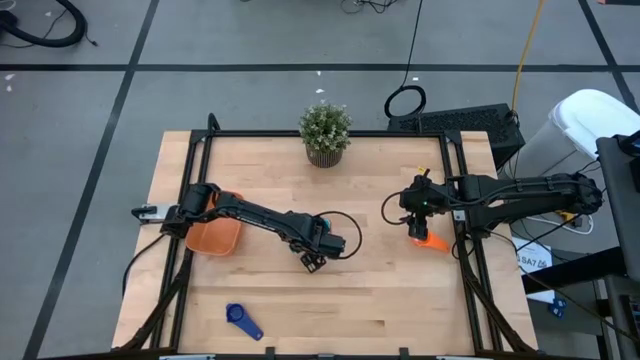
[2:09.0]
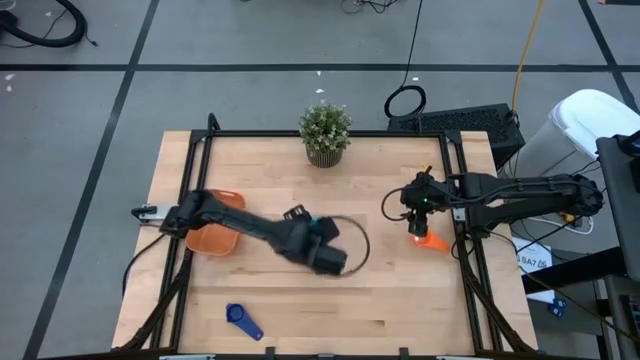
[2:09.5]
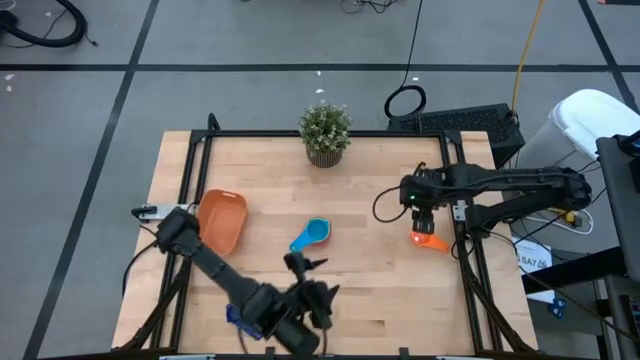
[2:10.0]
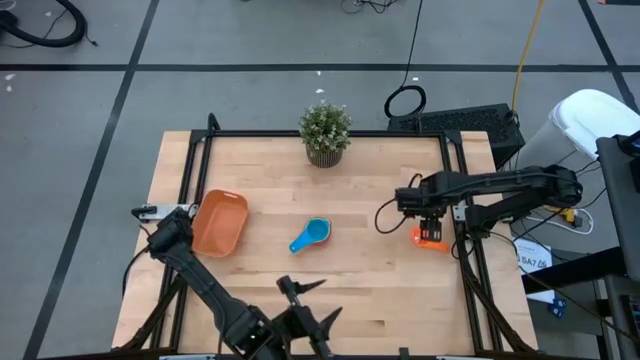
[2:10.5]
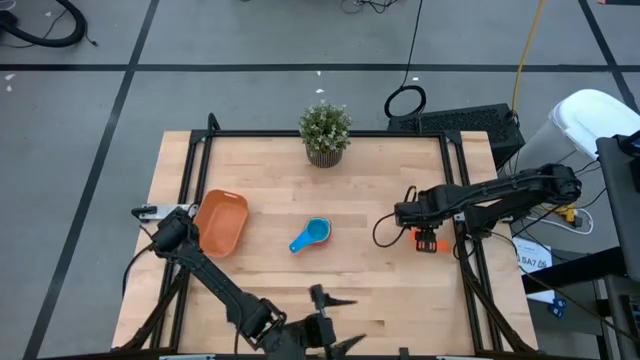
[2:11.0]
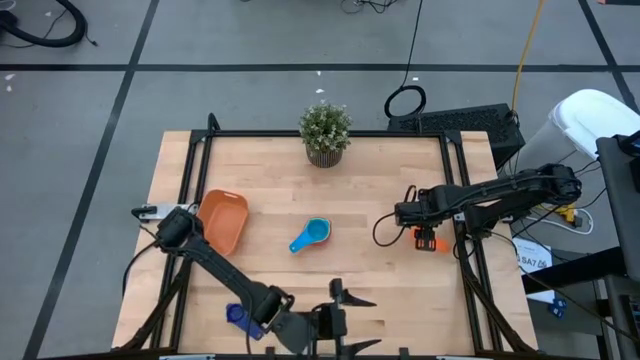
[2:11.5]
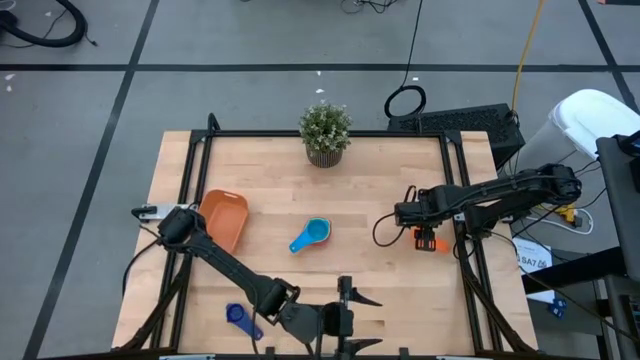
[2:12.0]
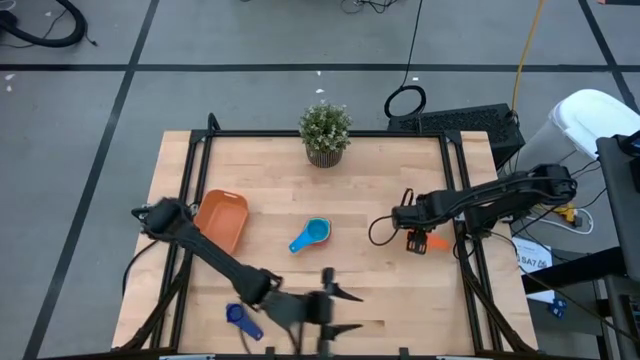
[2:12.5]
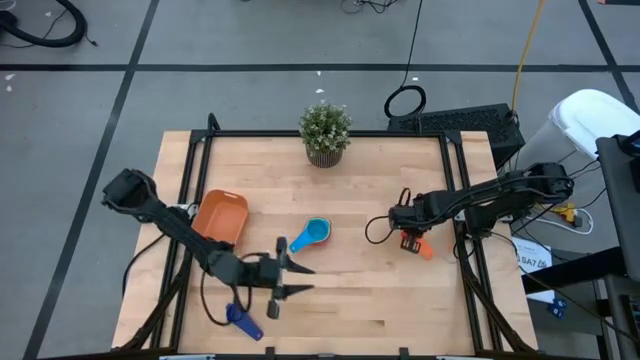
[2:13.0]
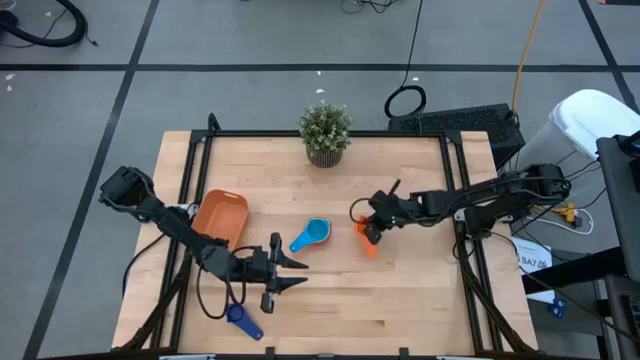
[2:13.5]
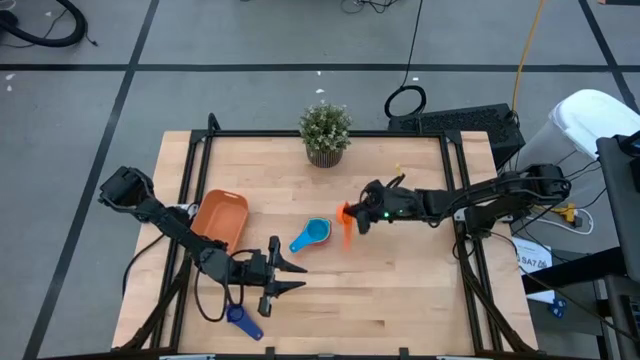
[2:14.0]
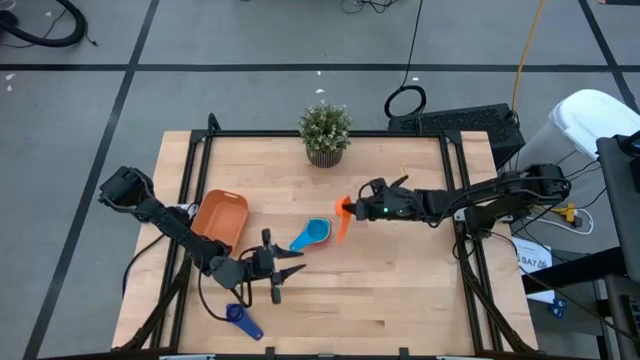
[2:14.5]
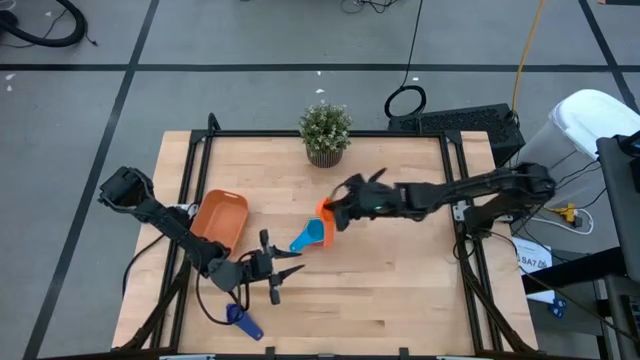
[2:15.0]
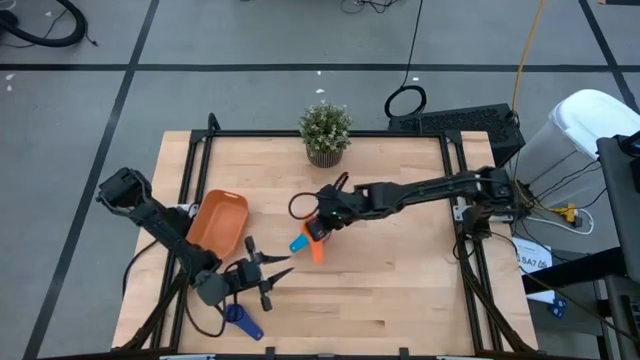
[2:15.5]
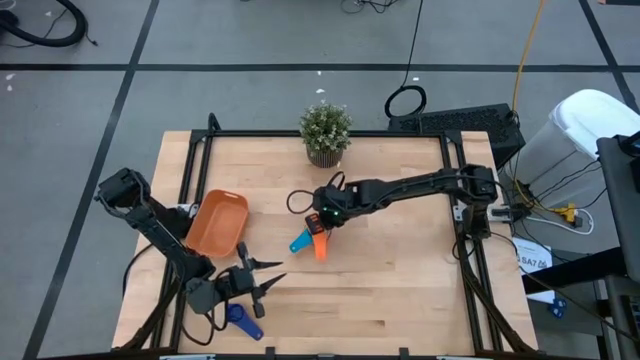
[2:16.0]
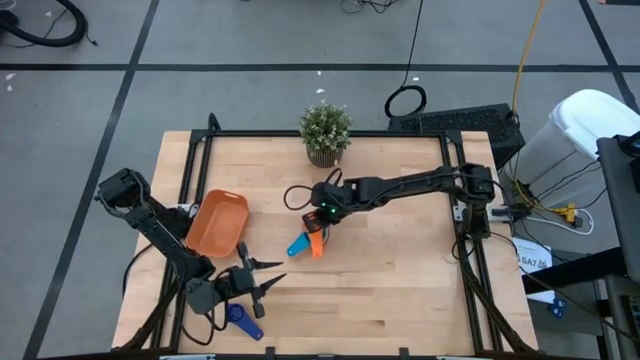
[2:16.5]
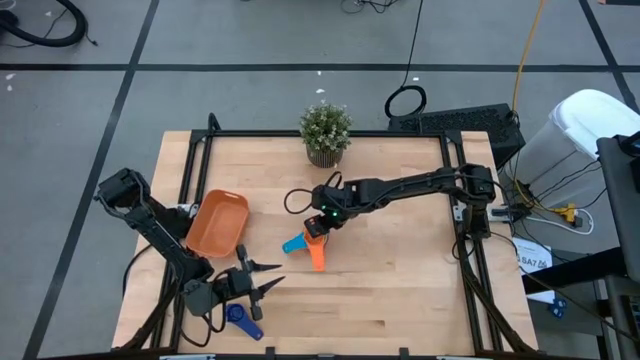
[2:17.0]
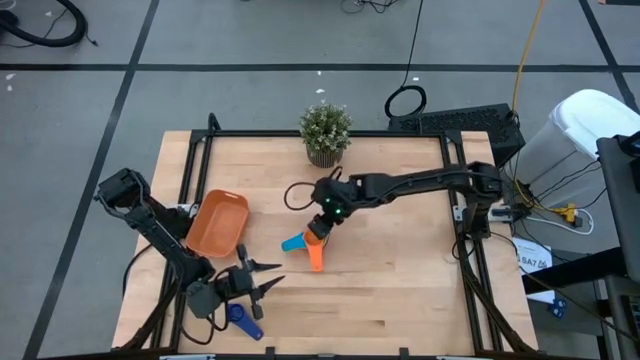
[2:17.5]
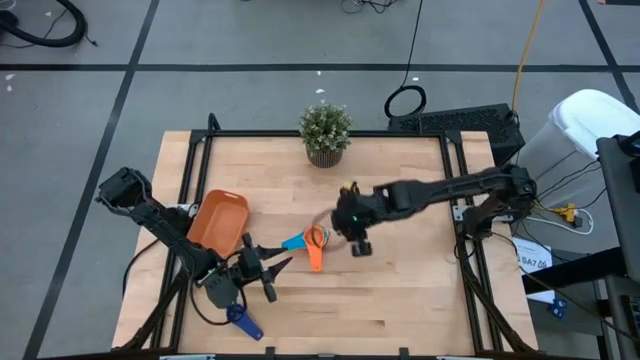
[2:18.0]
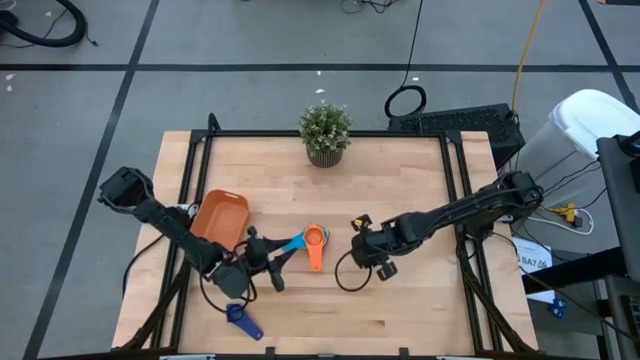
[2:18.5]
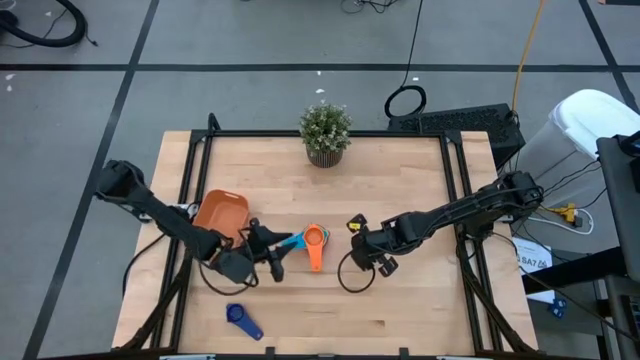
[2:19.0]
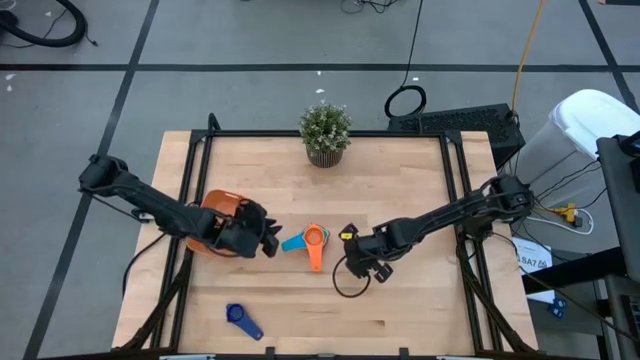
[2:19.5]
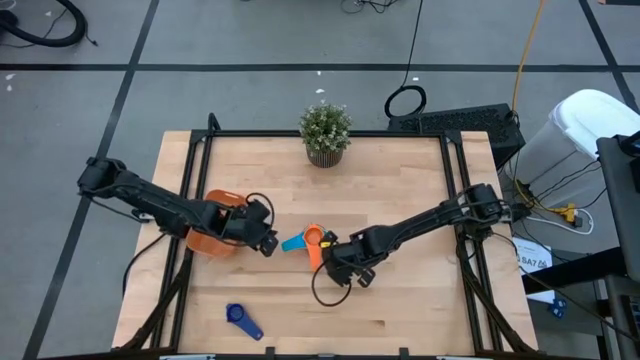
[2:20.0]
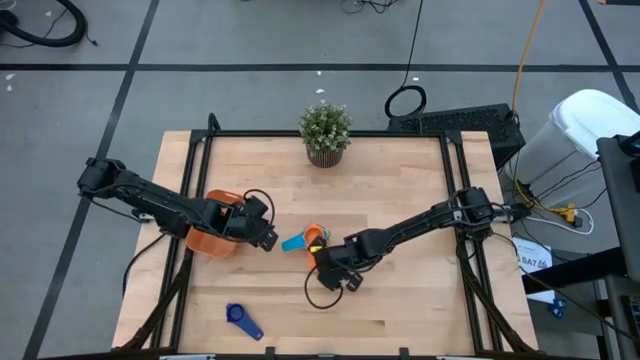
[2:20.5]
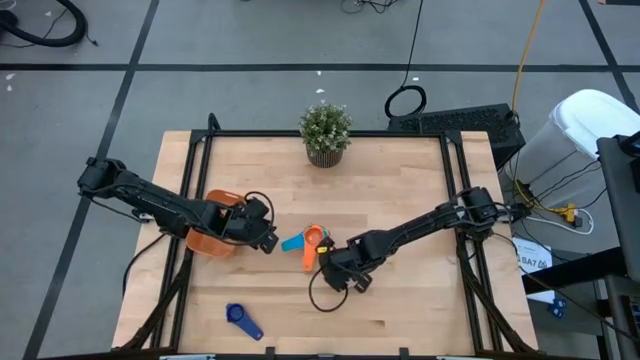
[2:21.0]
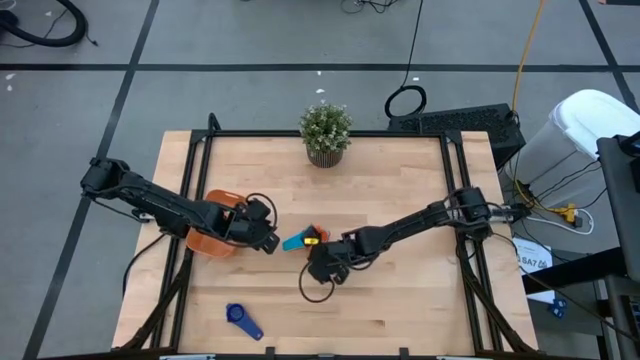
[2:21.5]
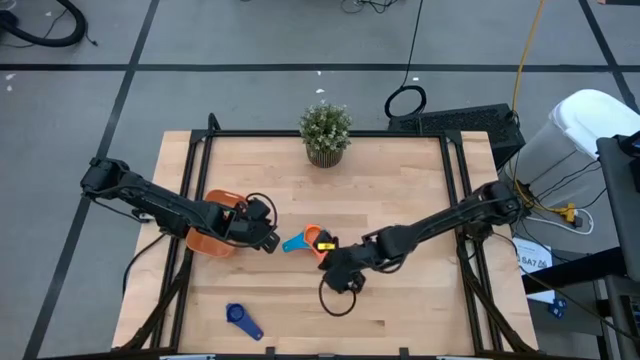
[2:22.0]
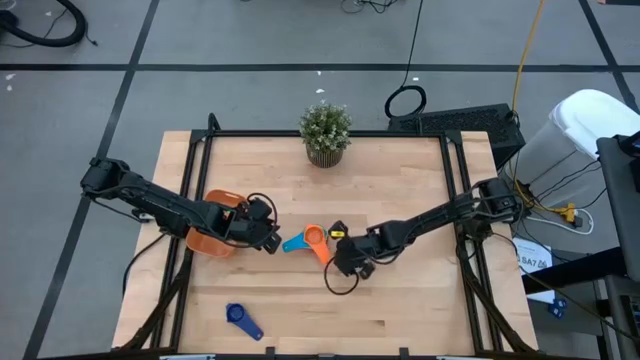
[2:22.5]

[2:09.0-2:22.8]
Task: Nest measuring cups in basket
Stack the orange measuring cup on top of the light blue measuring cup

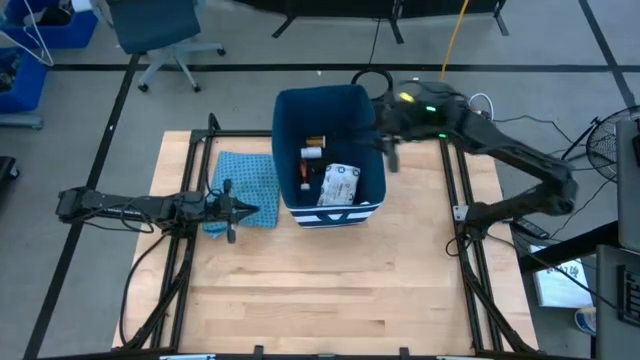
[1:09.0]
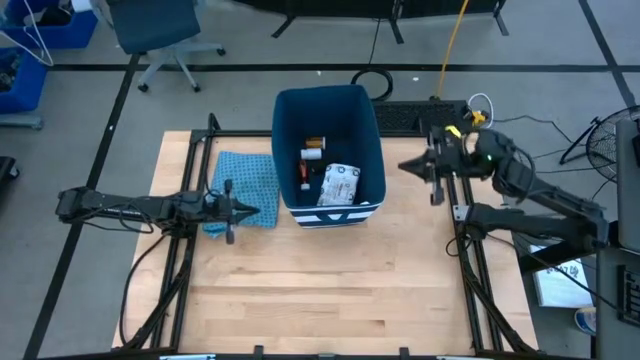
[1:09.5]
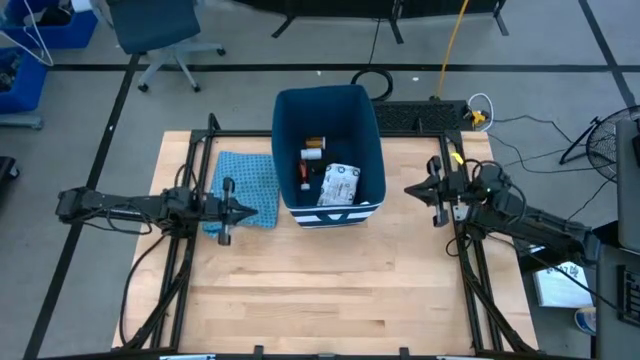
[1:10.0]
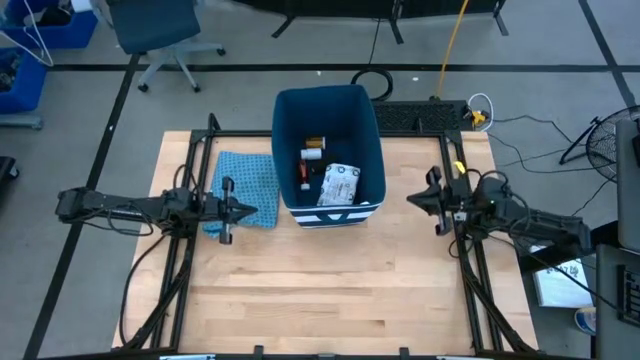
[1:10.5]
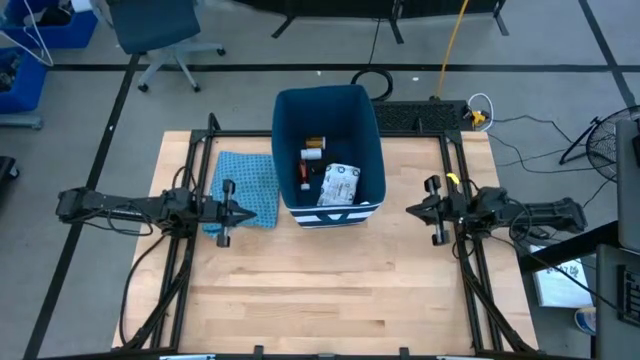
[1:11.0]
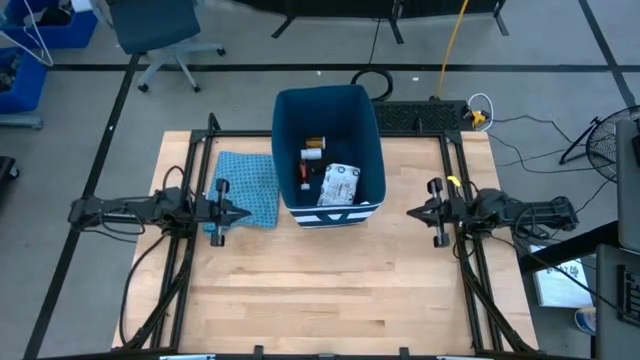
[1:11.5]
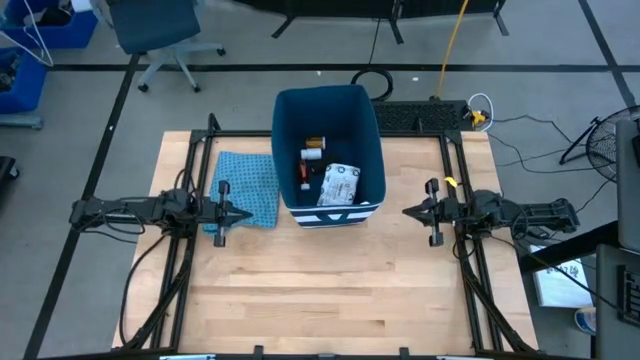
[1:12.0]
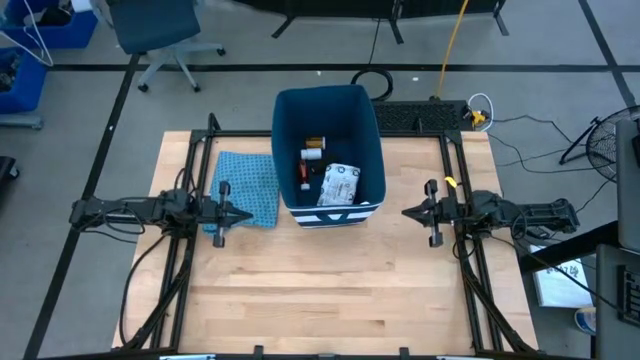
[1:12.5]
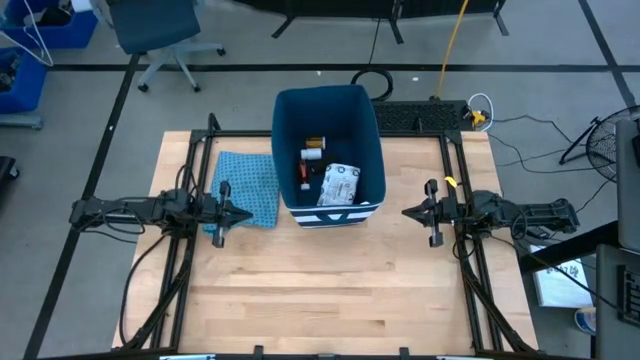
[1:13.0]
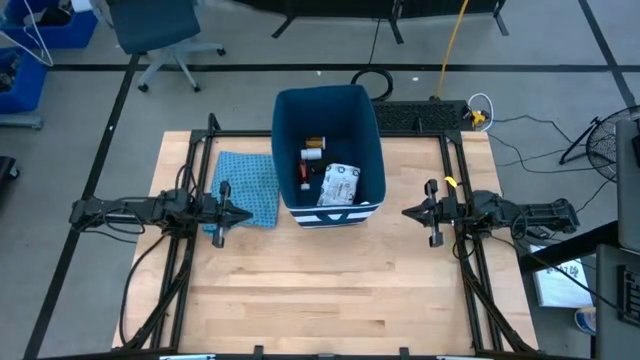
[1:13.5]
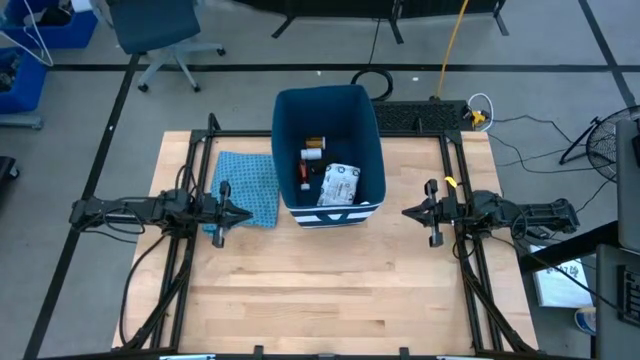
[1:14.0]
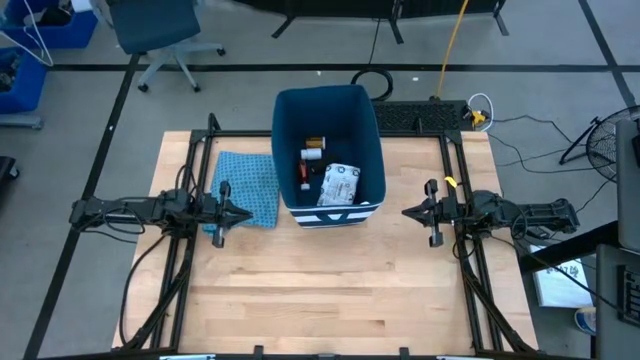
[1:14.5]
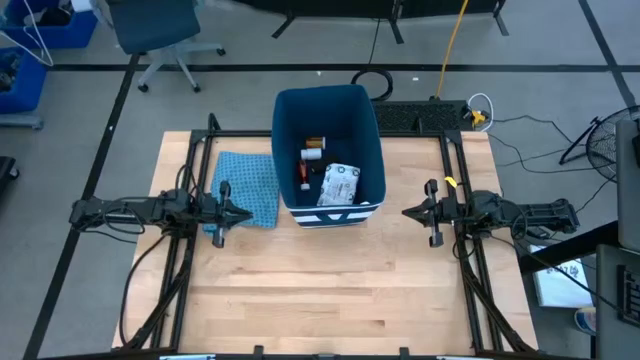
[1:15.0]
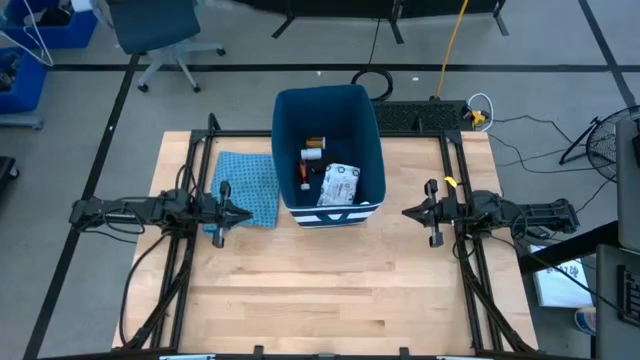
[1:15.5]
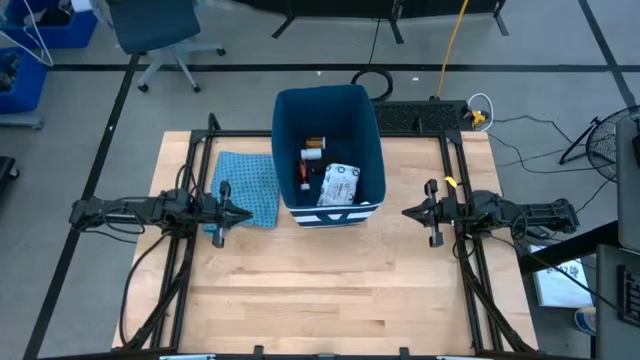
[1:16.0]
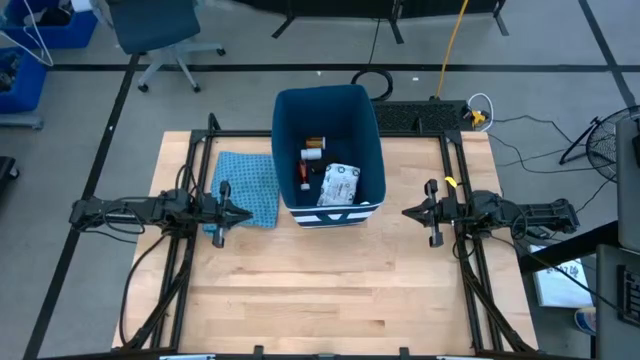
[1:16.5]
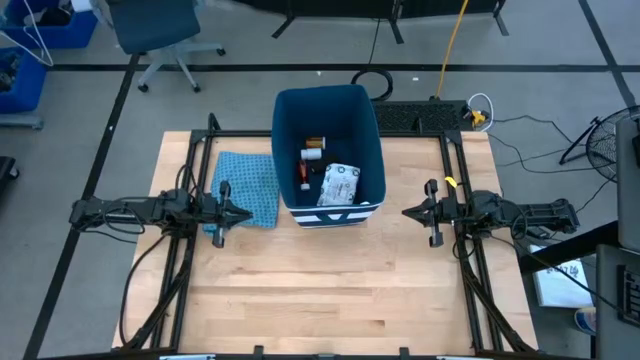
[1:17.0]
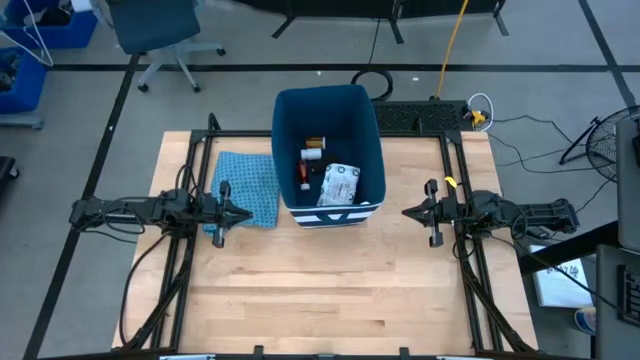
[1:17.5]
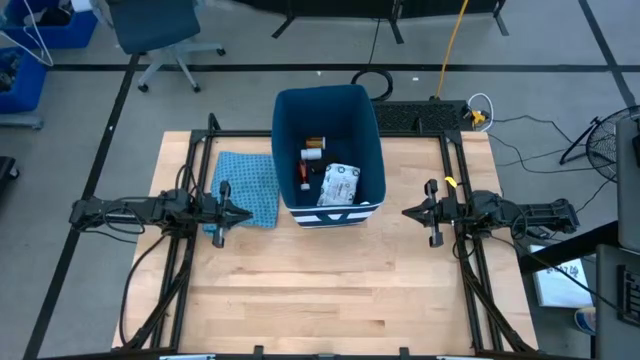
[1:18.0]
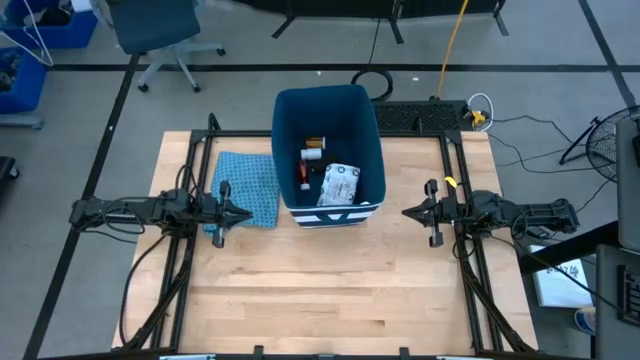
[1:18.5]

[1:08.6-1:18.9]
Task: Pick & place medical supplies in basket/bin
Return to Home Position
